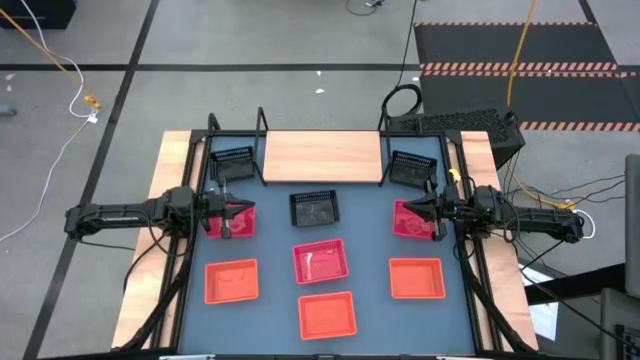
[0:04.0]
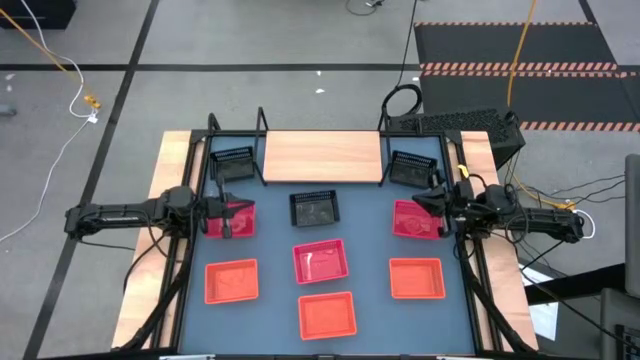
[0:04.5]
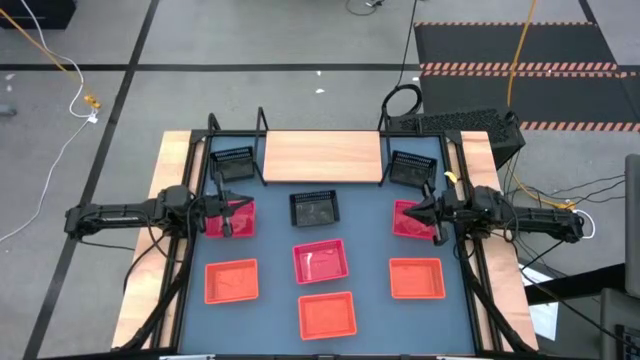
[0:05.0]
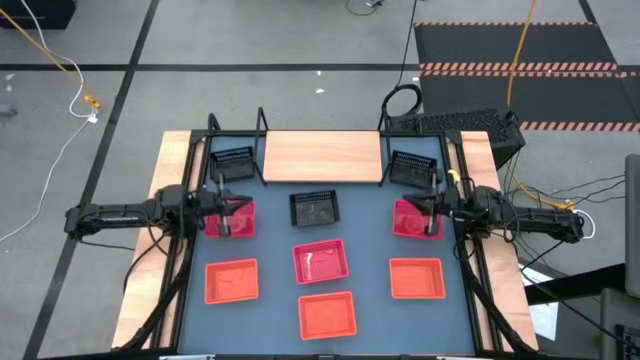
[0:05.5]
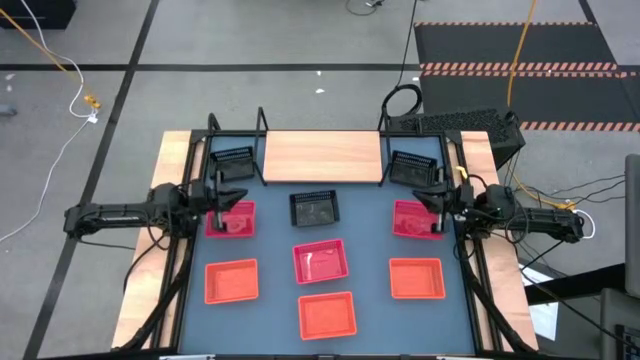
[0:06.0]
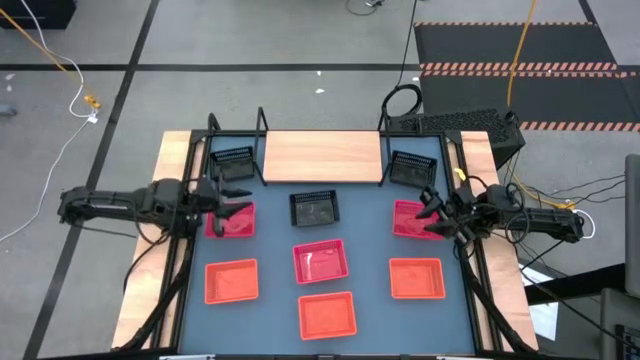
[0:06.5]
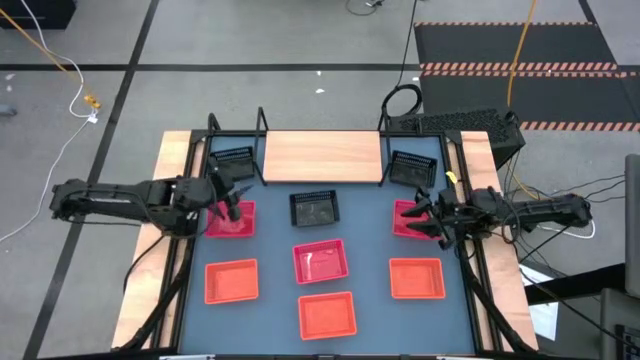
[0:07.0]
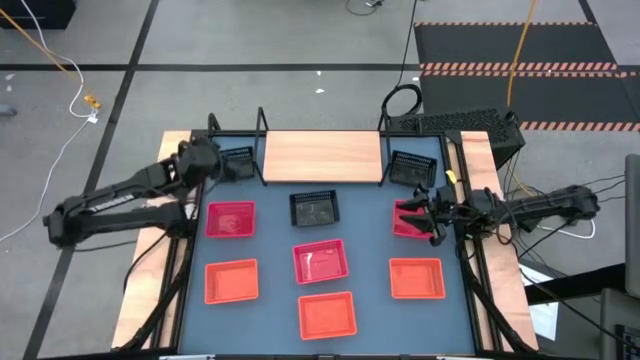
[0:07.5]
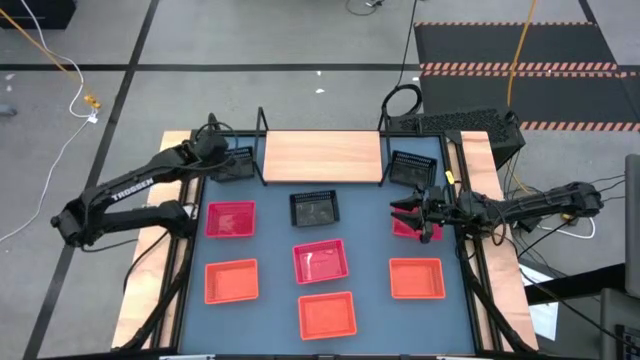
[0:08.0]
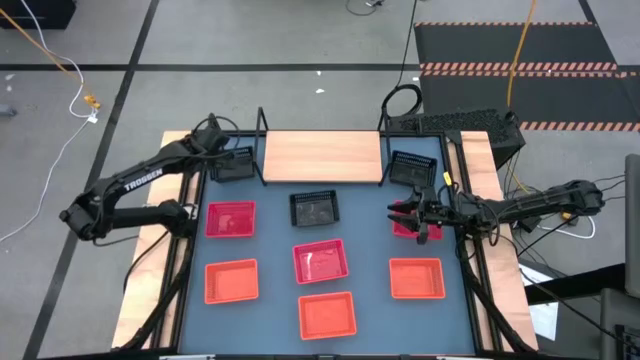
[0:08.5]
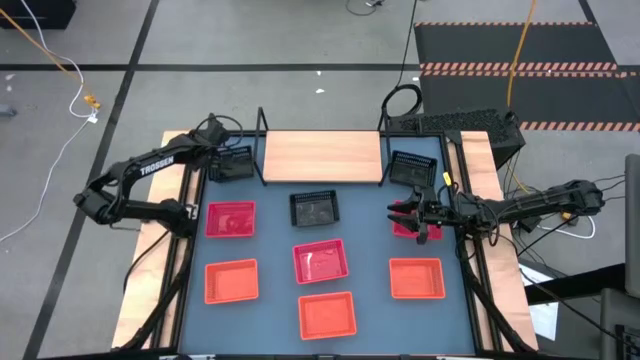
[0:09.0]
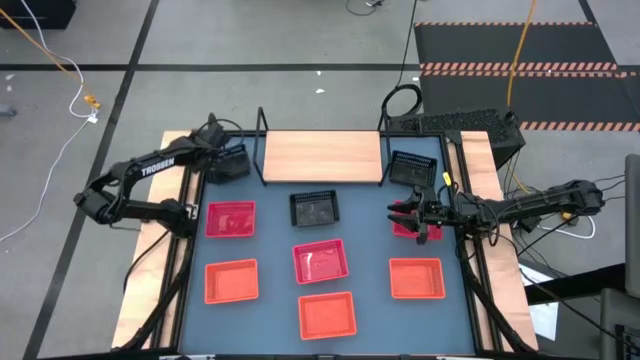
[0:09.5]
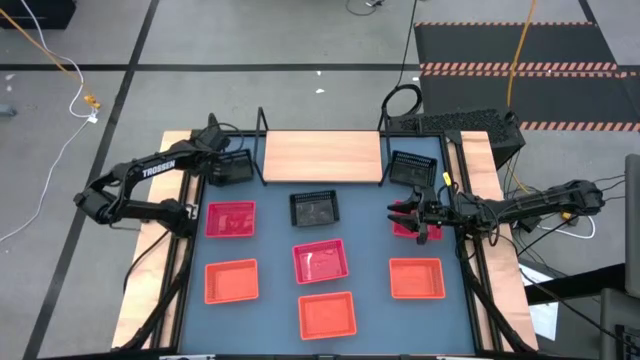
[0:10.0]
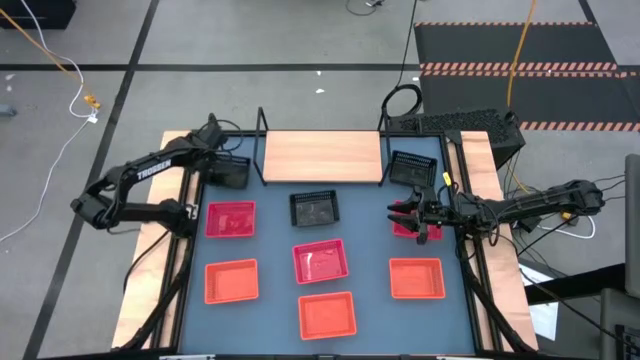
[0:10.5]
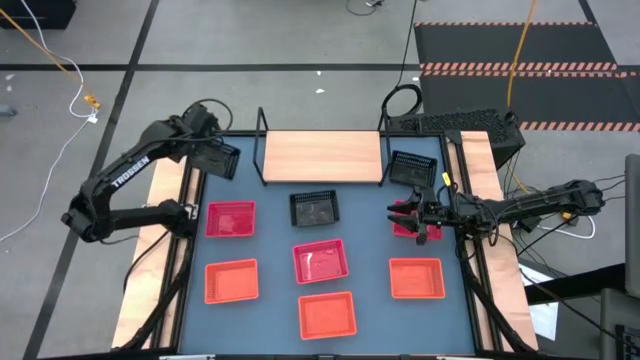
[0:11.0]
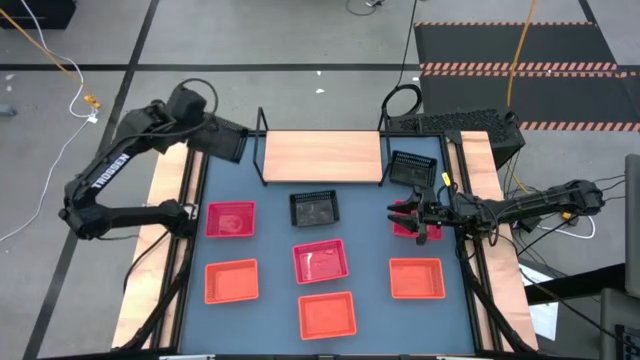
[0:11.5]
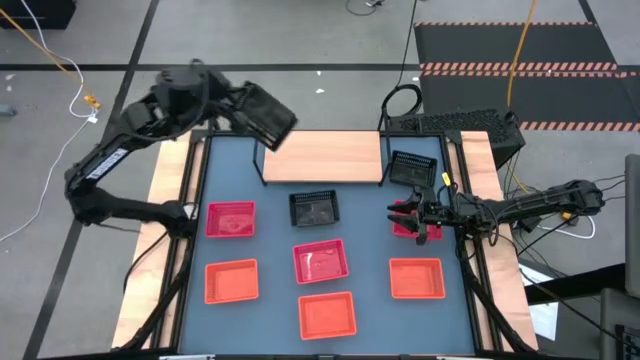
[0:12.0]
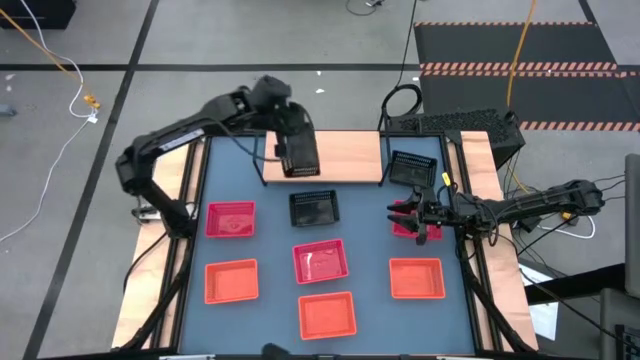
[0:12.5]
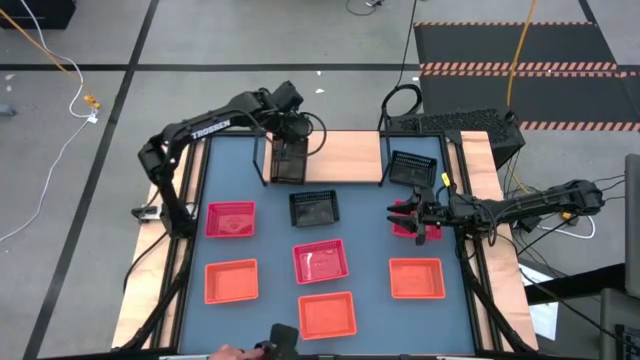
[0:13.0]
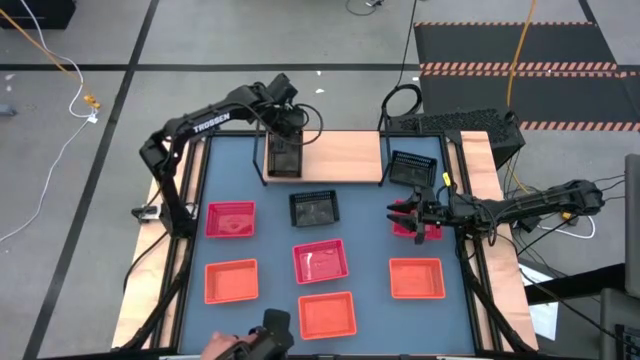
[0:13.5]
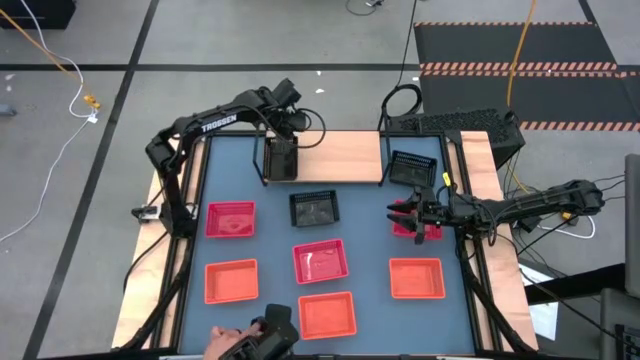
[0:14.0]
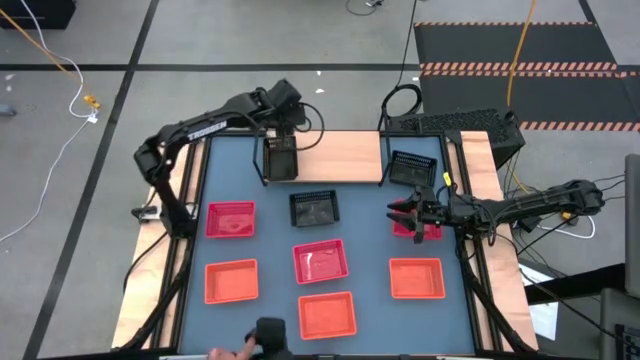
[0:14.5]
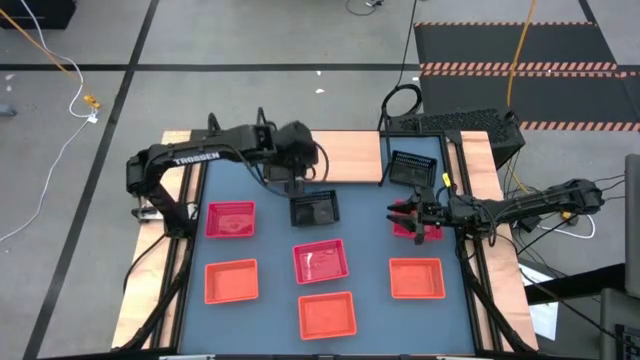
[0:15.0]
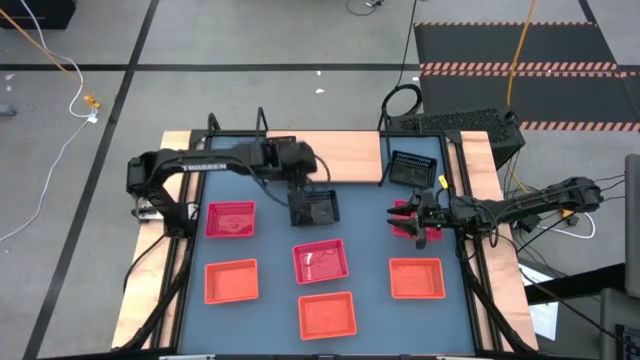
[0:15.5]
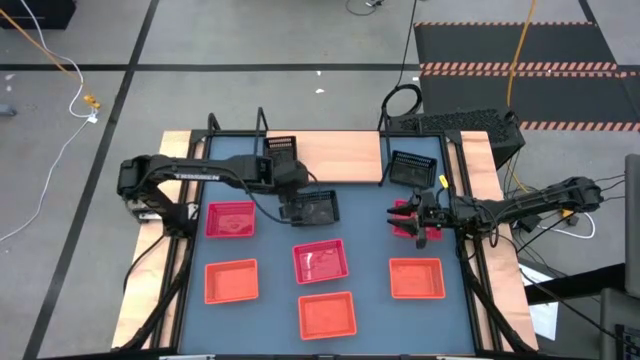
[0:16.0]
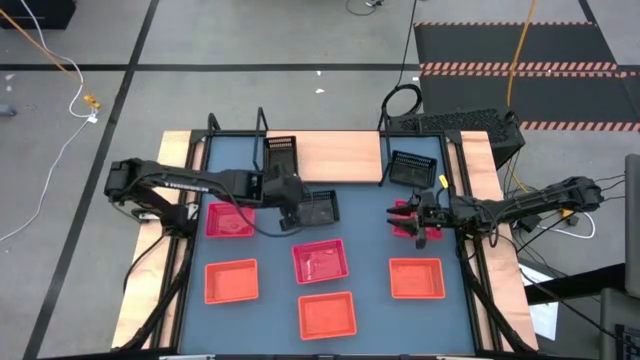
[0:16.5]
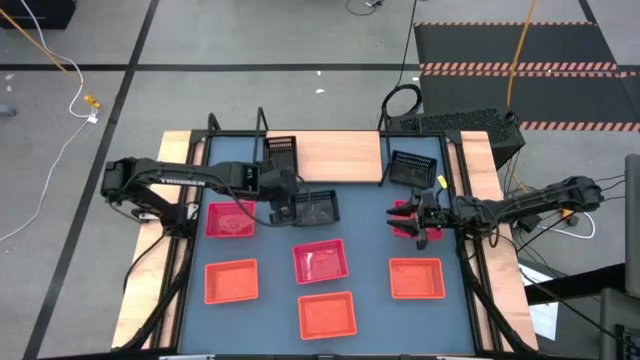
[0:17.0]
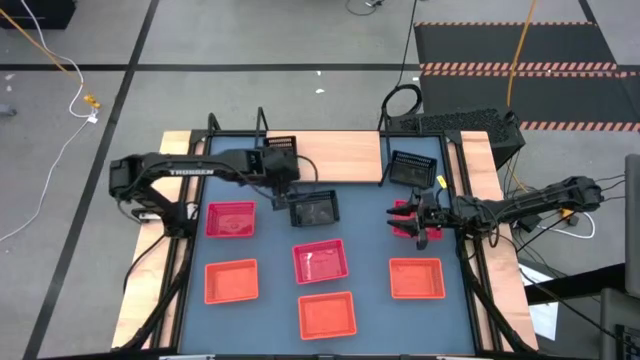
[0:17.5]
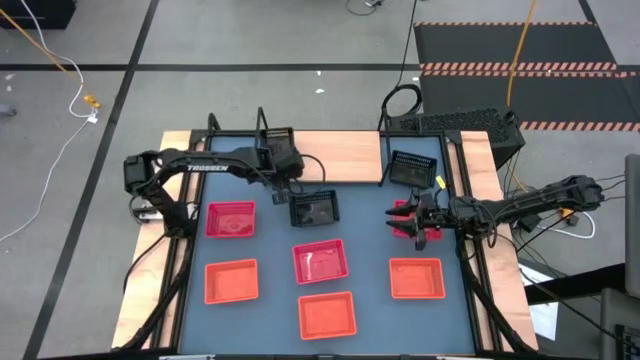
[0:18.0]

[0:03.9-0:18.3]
Task: Stack baskets on shelf by color
Put the left black basket on the shelf

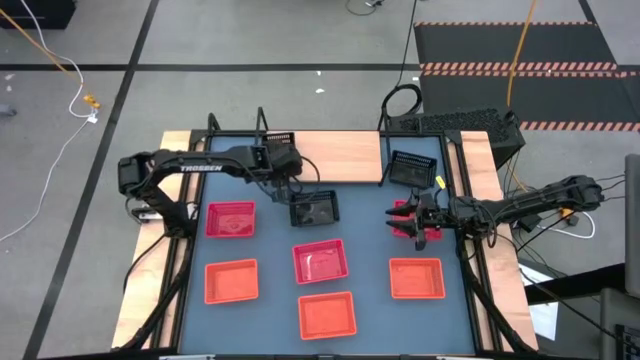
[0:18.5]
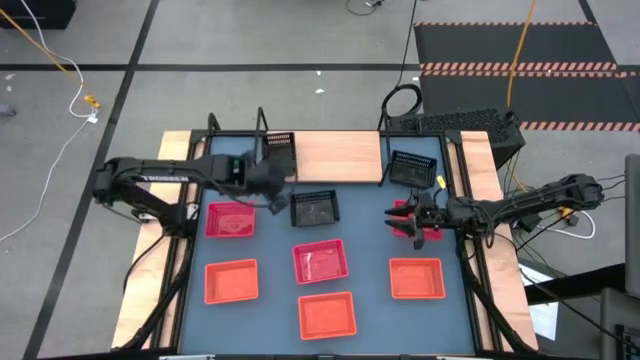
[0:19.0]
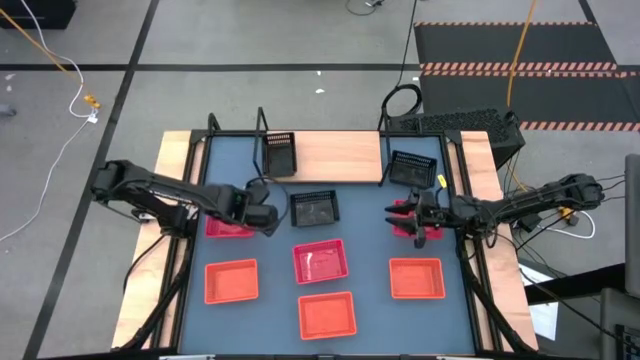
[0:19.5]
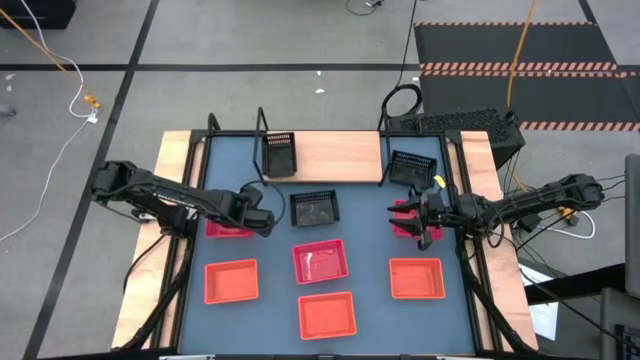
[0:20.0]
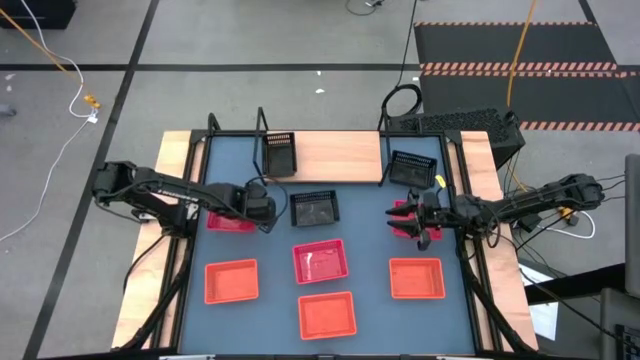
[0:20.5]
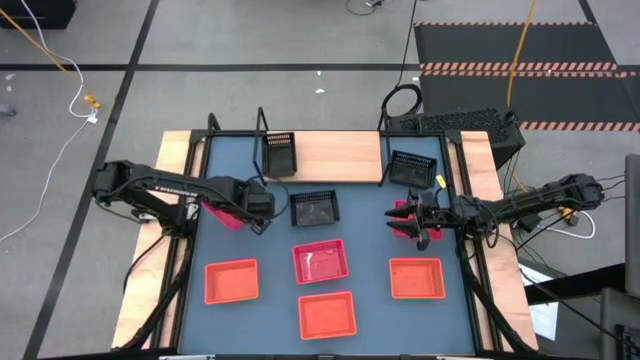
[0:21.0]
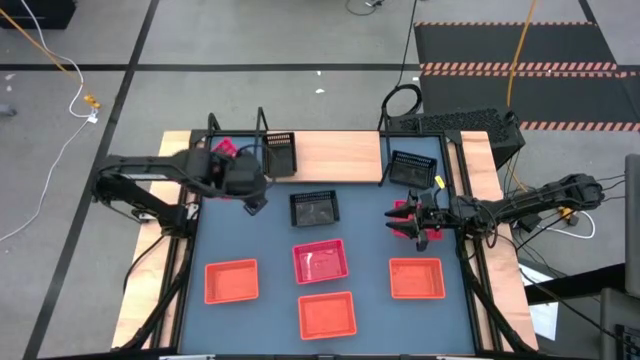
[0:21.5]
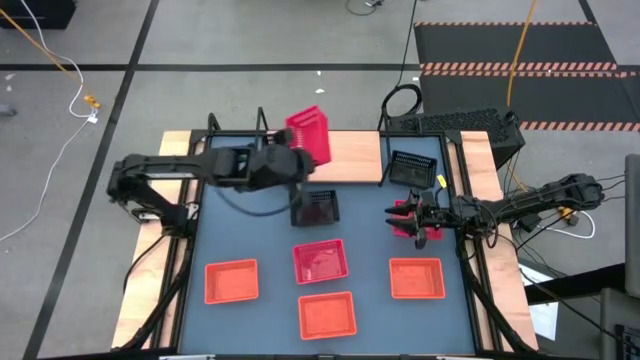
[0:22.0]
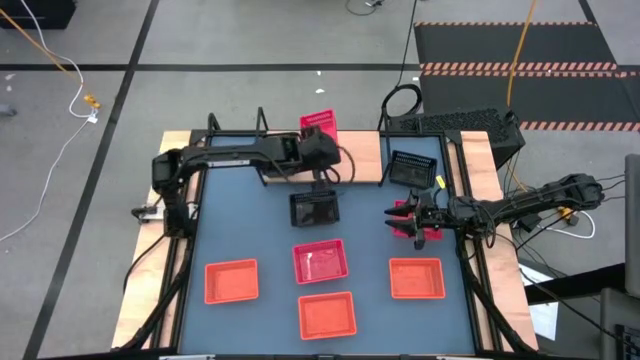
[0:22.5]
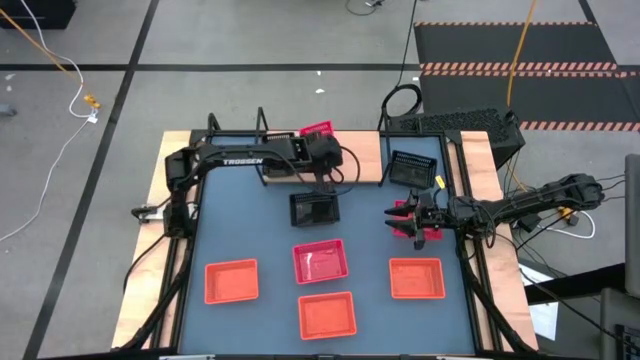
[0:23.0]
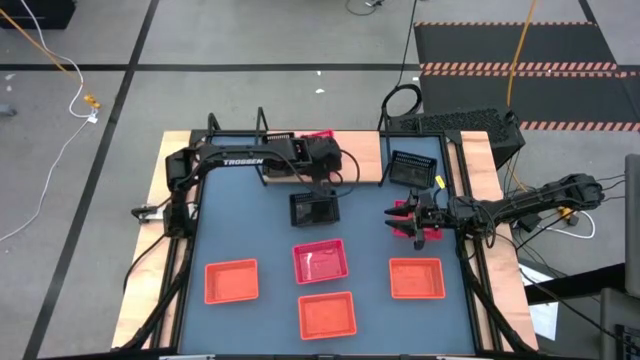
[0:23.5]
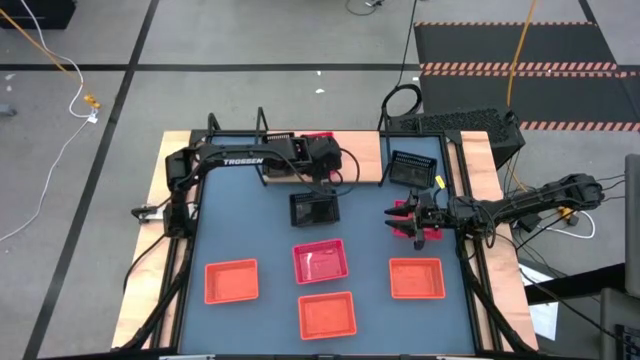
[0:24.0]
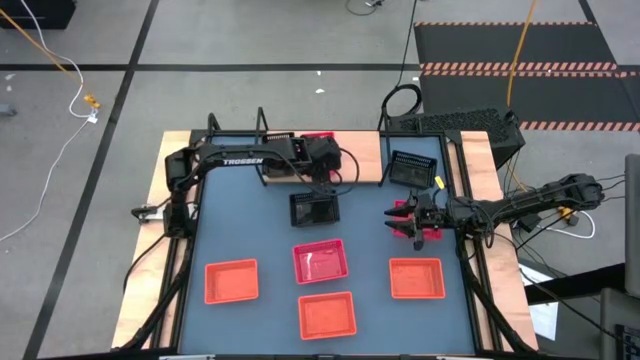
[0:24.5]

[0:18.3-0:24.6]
Put the left red basket on the shelf
